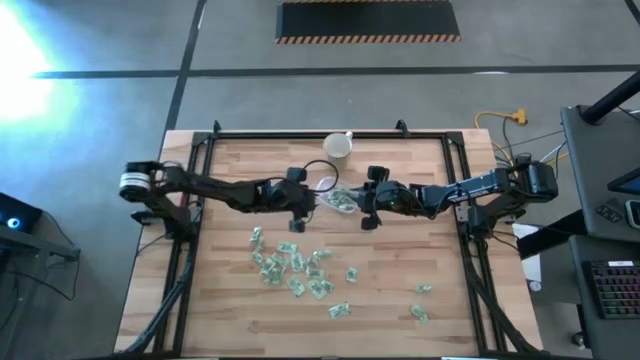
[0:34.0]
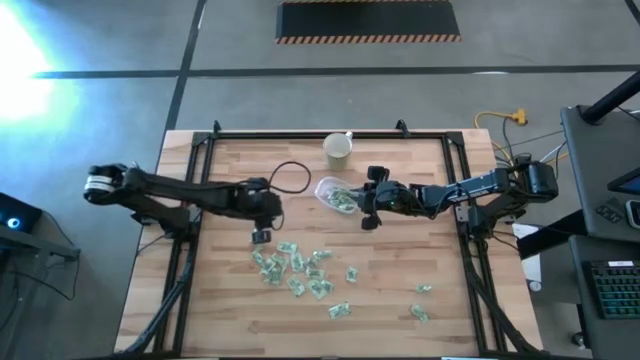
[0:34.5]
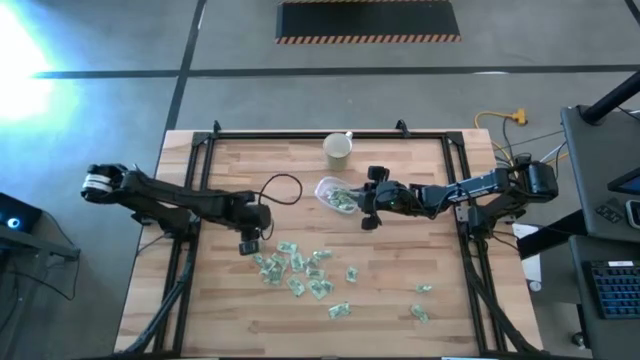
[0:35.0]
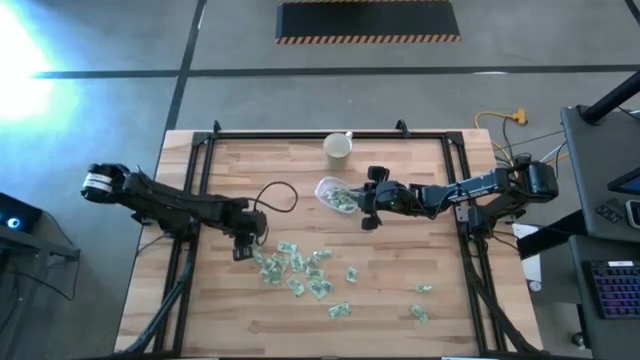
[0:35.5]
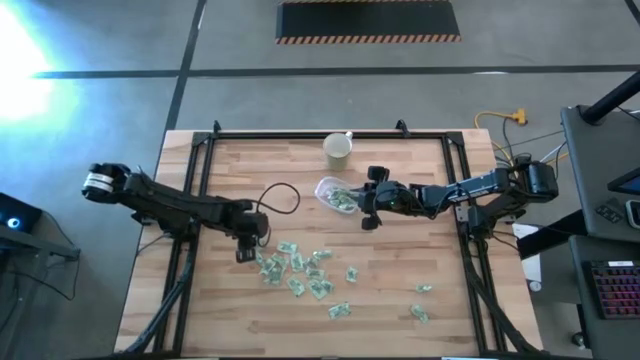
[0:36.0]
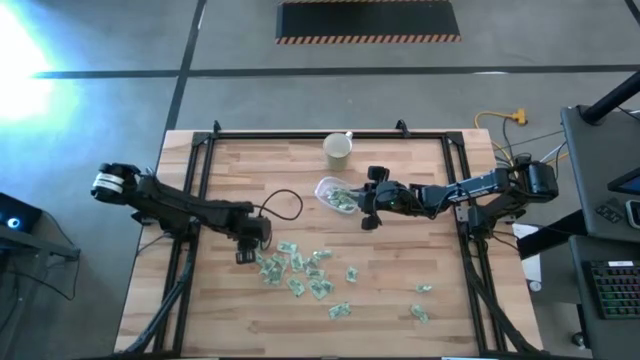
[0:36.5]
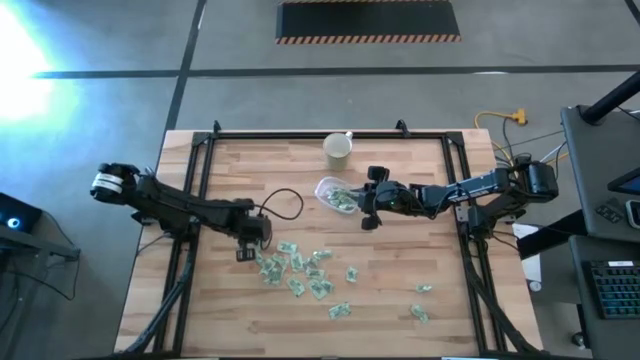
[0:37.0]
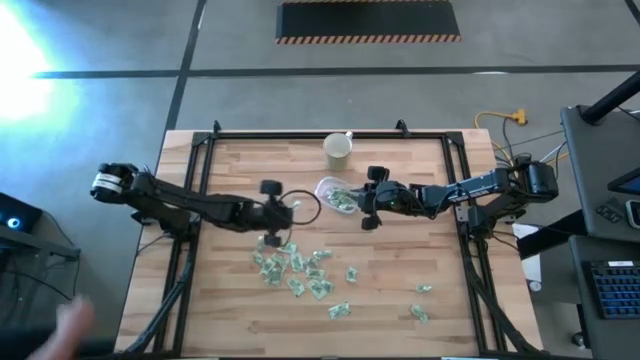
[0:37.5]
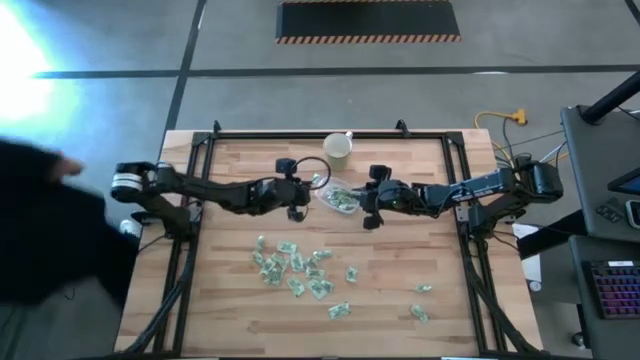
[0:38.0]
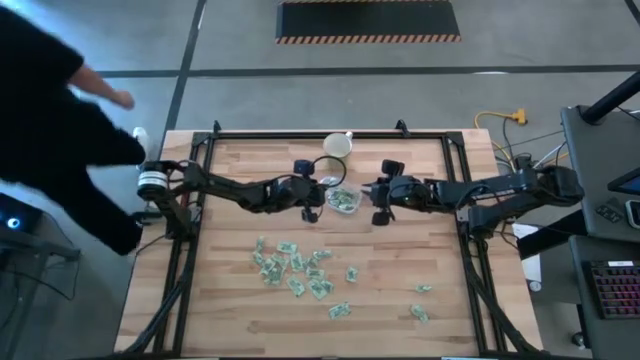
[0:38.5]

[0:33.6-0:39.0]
Task: Pick and place items into bin
Put the green stevia packet into the transparent bin

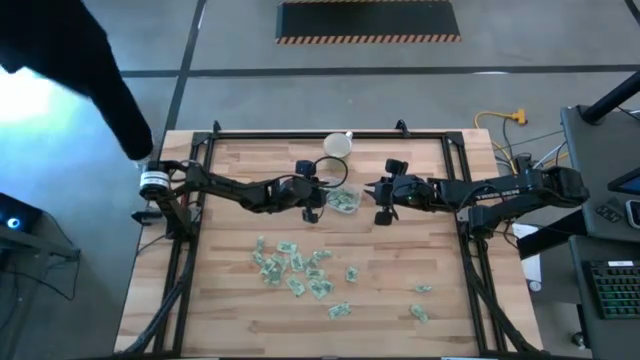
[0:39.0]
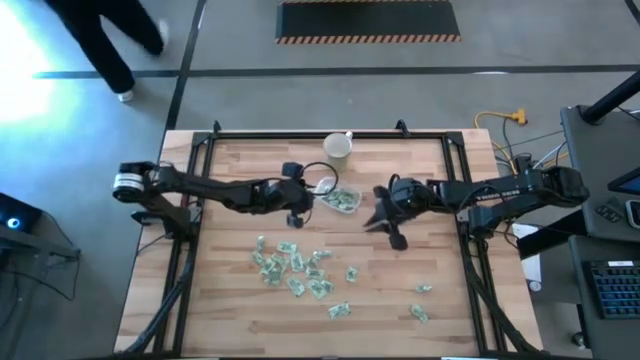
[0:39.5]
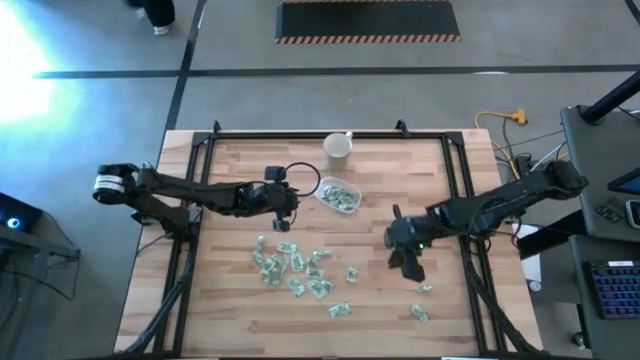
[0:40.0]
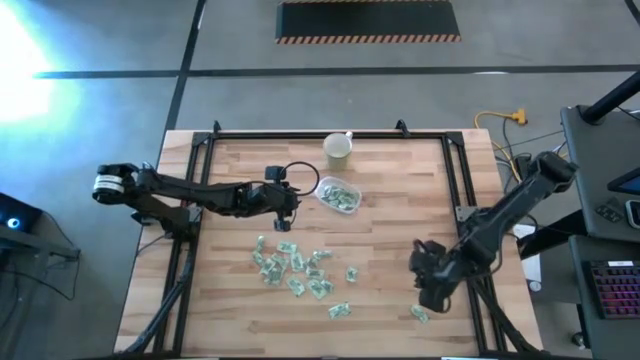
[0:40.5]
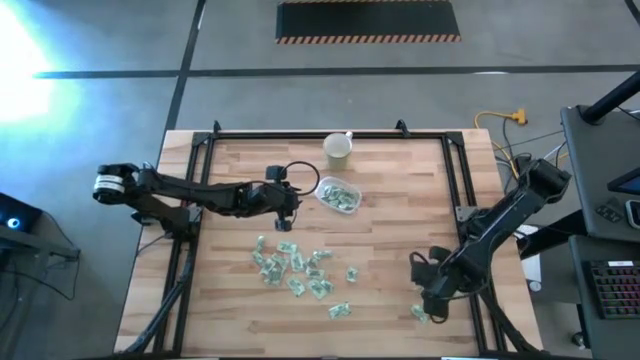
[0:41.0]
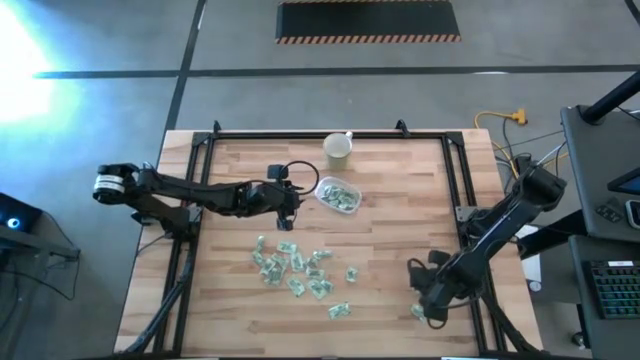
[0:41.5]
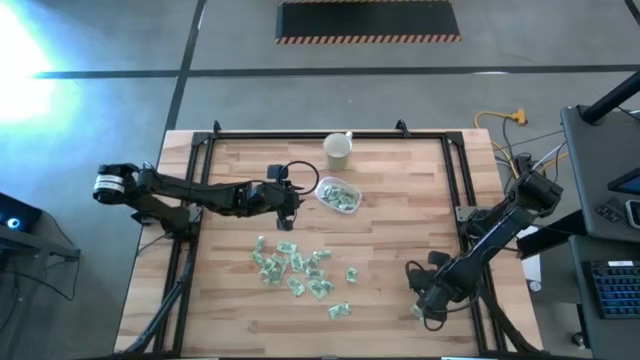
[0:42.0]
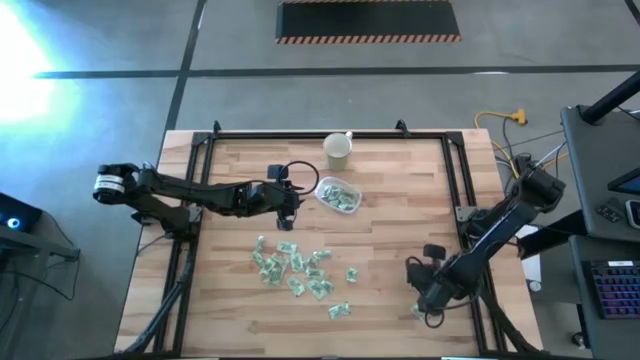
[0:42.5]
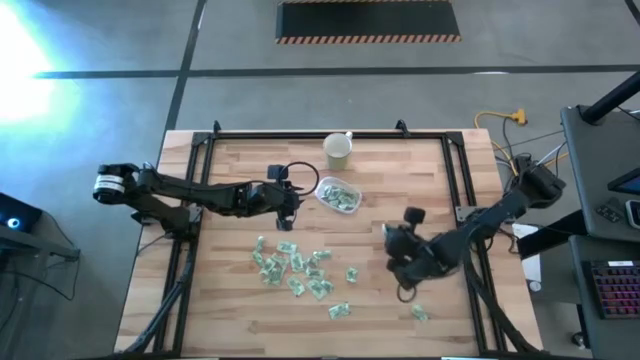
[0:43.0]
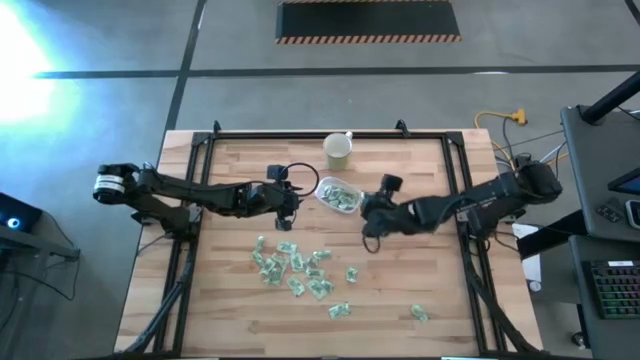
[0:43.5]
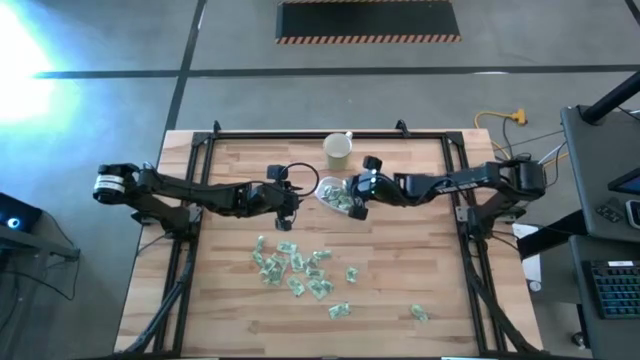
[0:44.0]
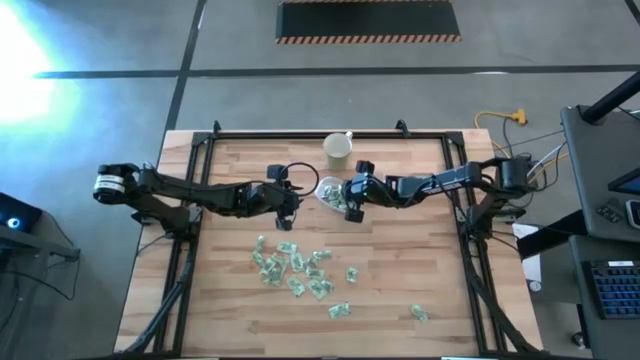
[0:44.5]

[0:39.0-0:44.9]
Put the green stevia packet into the transparent bin

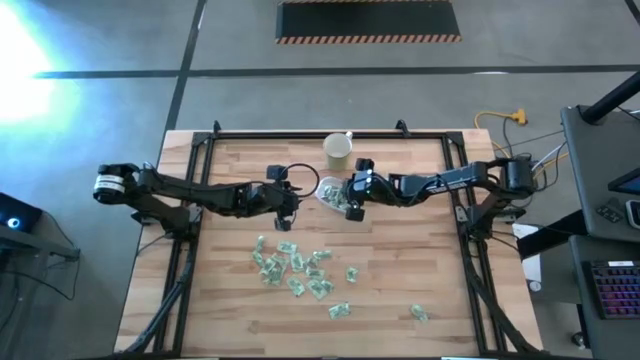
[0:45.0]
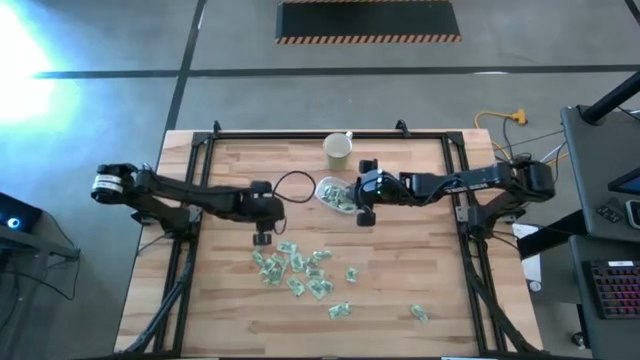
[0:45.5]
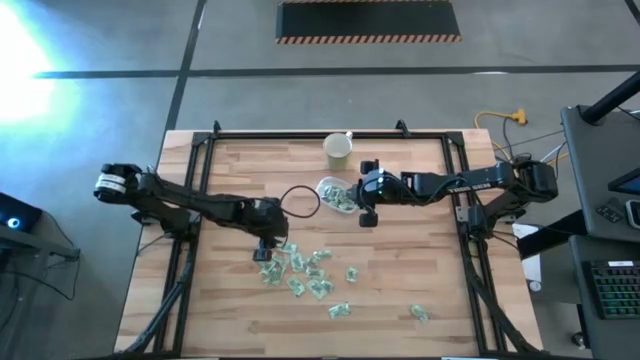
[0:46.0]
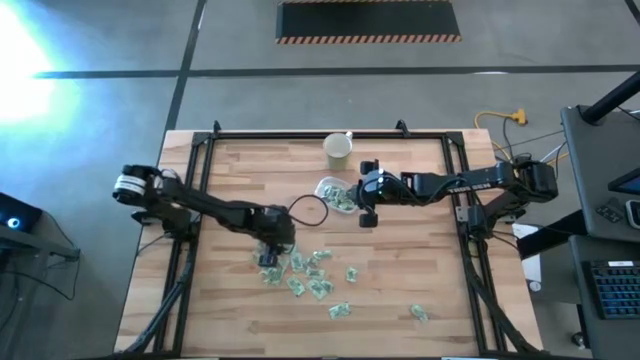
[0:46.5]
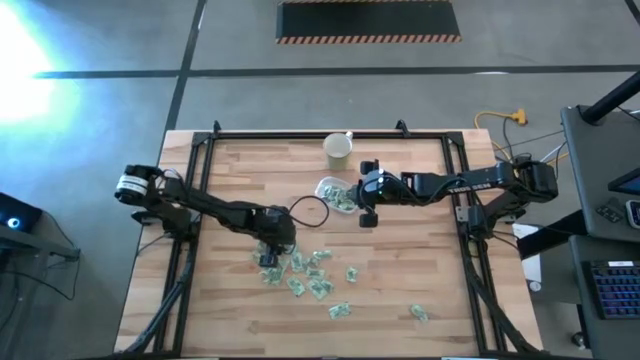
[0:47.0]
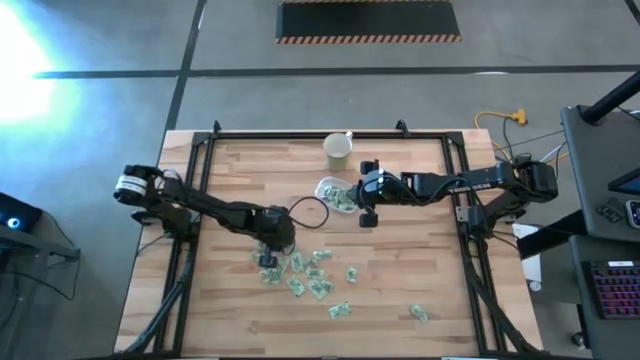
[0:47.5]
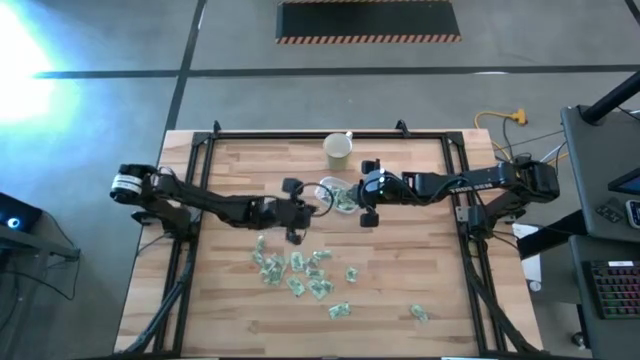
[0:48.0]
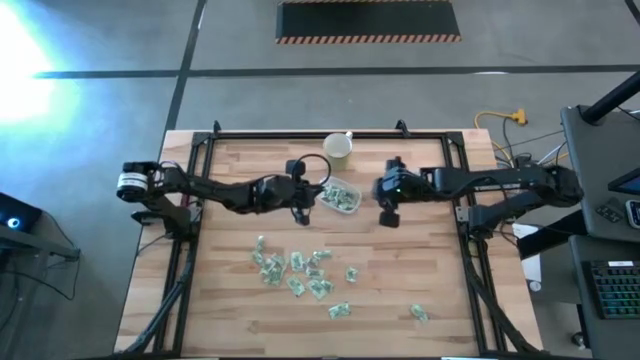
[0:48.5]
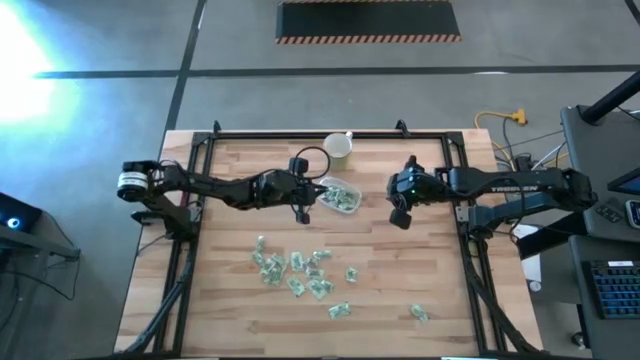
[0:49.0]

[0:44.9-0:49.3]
Put the green stevia packet into the transparent bin

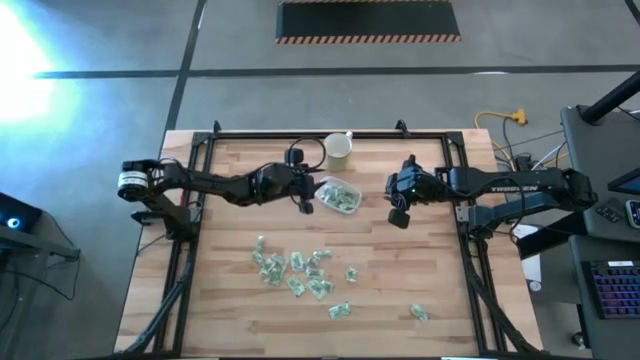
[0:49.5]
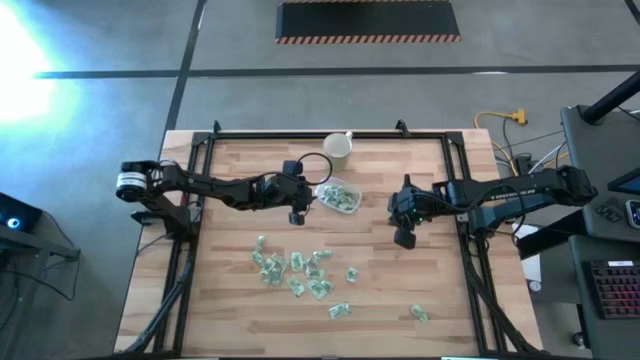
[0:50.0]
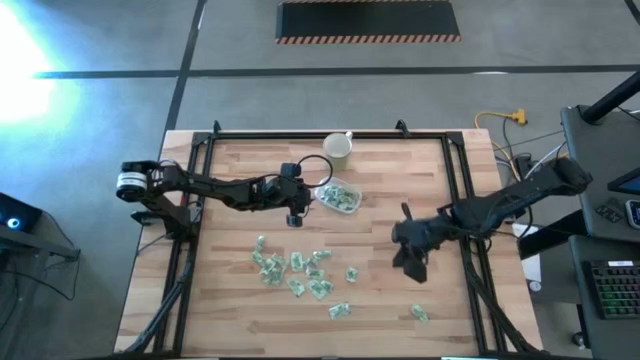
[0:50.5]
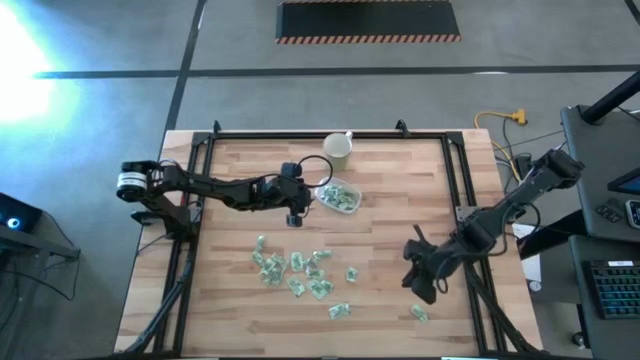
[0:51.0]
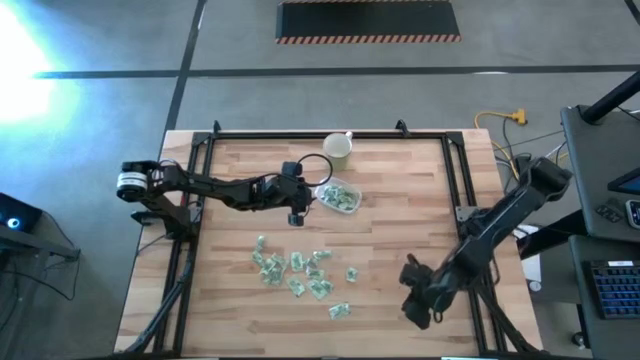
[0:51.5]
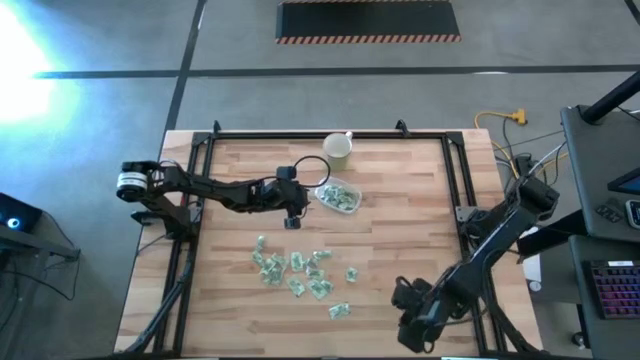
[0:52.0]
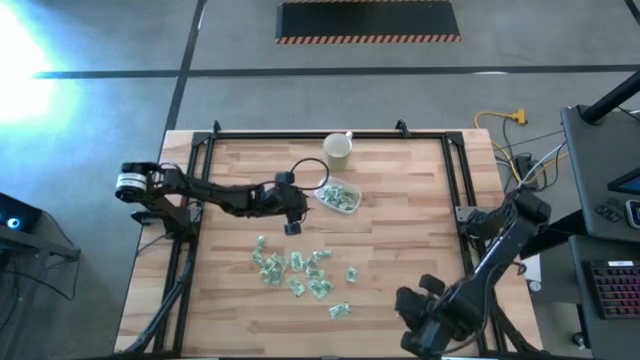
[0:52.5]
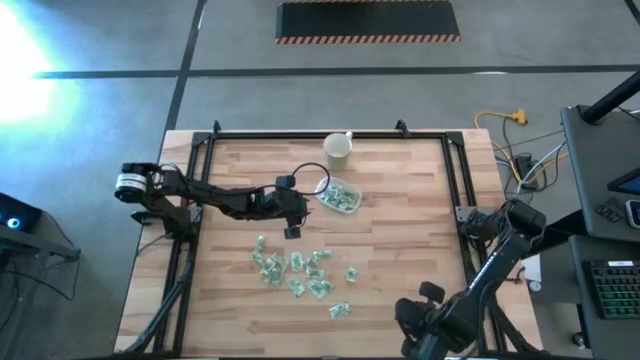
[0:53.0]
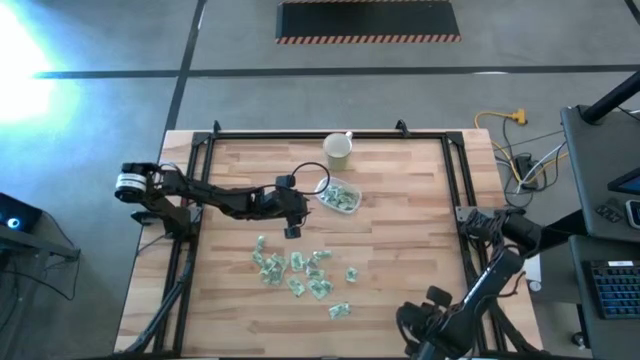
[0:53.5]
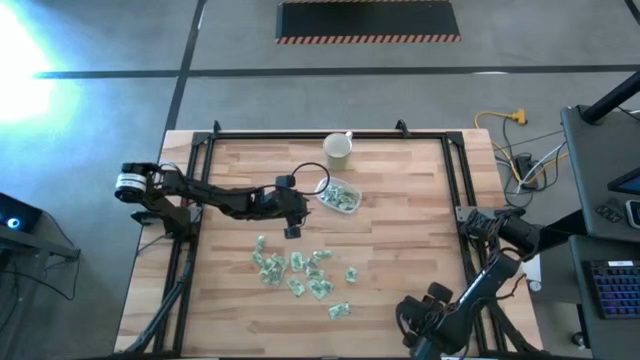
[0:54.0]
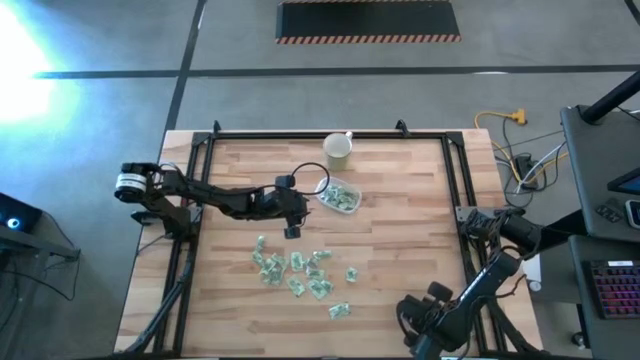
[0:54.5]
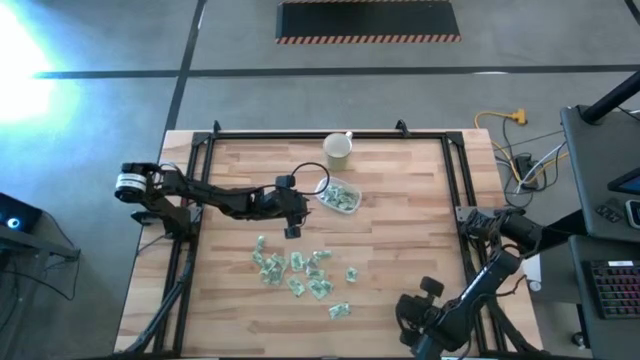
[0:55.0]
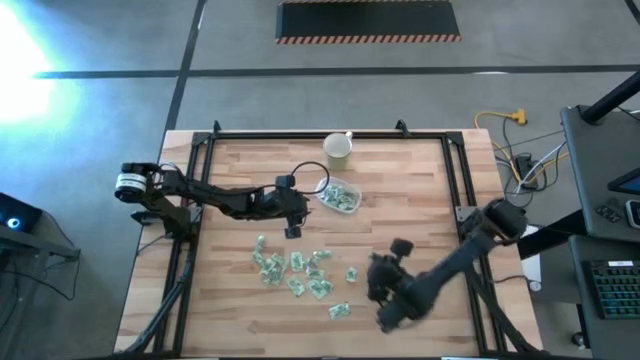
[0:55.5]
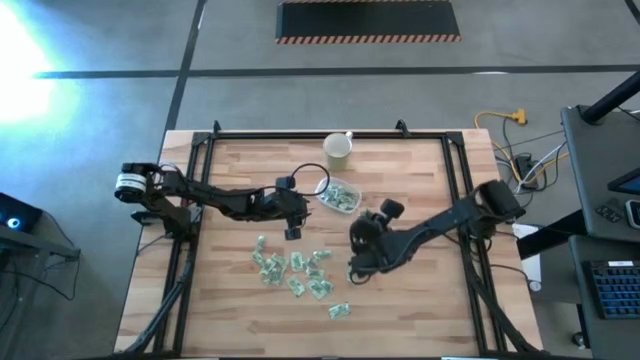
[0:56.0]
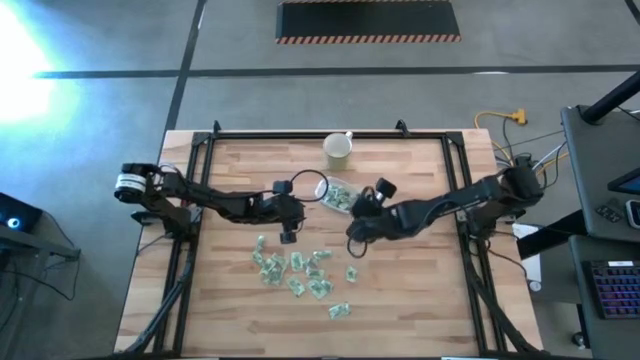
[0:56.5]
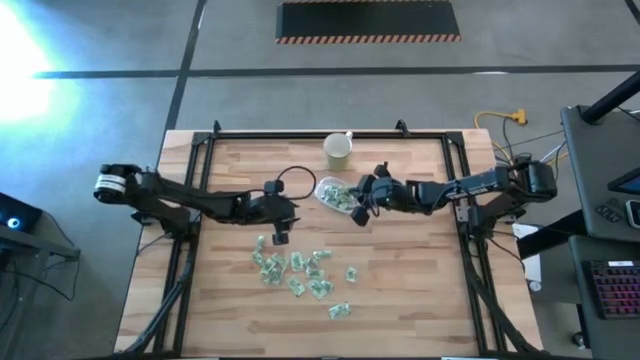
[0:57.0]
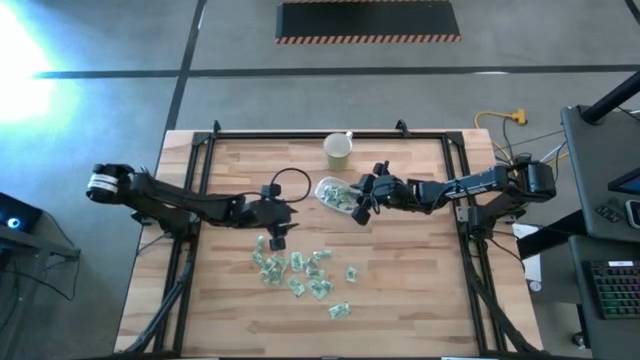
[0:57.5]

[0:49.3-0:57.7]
Put the green stevia packet into the transparent bin
